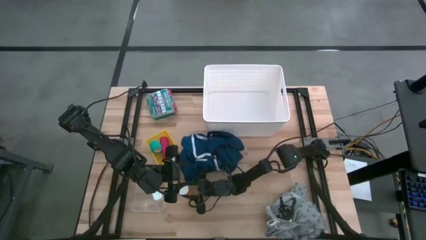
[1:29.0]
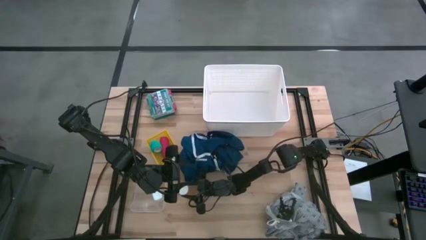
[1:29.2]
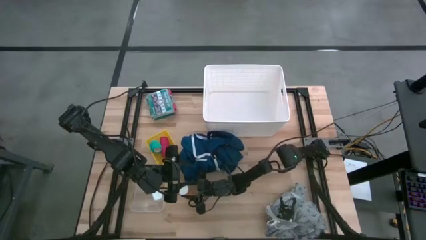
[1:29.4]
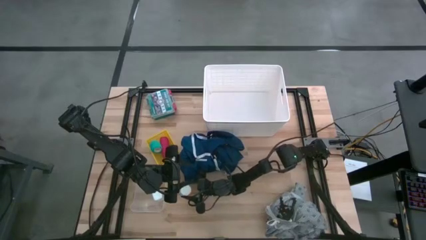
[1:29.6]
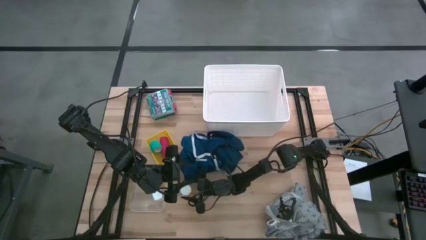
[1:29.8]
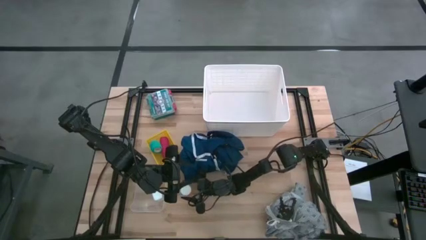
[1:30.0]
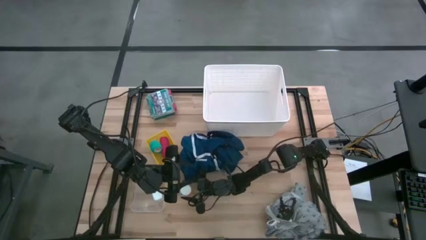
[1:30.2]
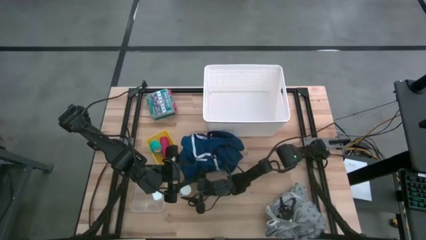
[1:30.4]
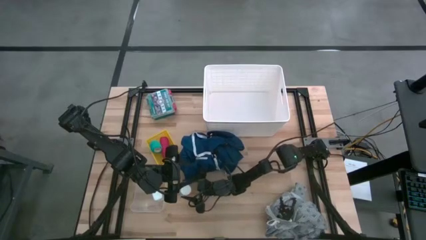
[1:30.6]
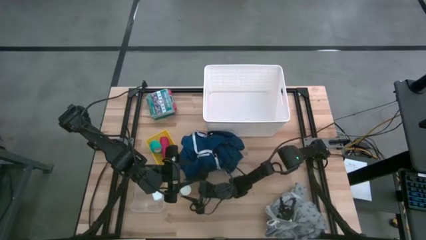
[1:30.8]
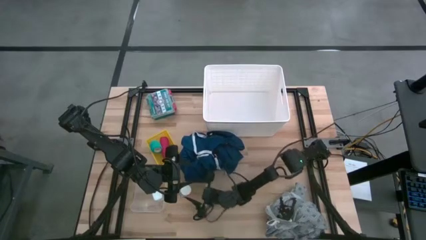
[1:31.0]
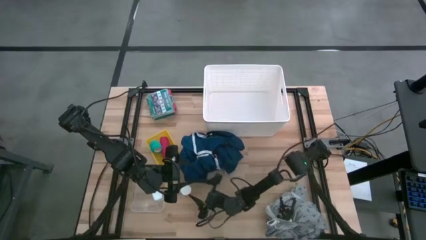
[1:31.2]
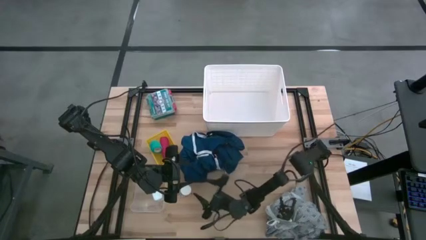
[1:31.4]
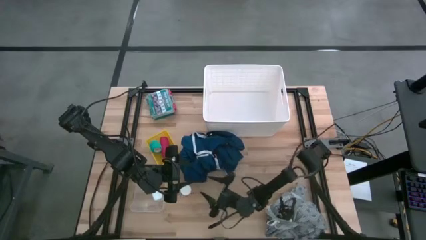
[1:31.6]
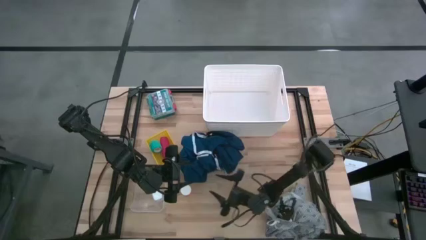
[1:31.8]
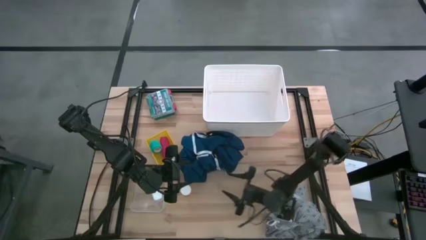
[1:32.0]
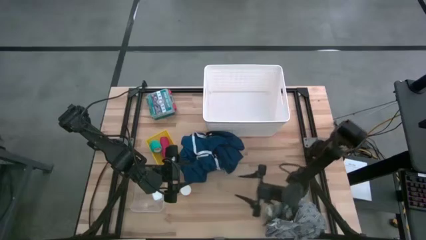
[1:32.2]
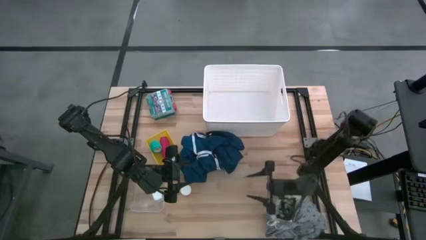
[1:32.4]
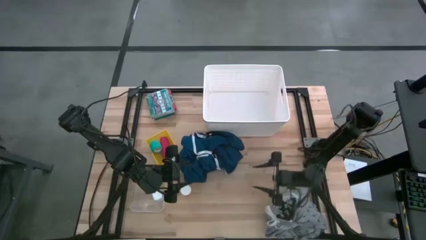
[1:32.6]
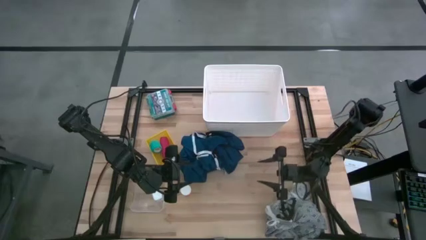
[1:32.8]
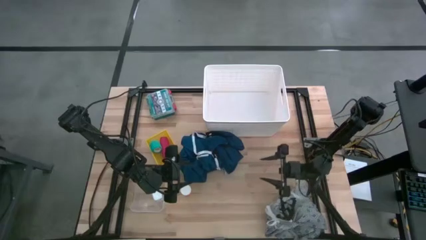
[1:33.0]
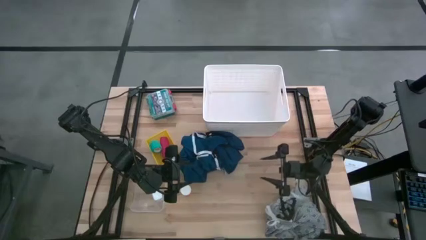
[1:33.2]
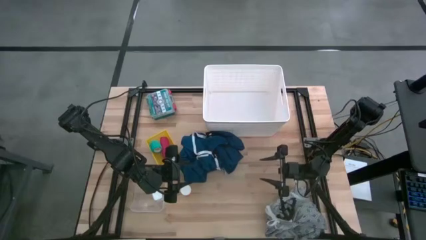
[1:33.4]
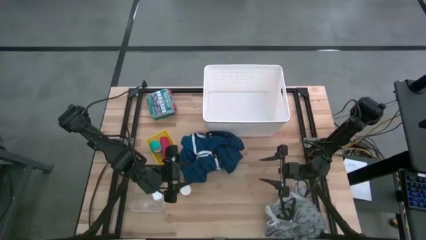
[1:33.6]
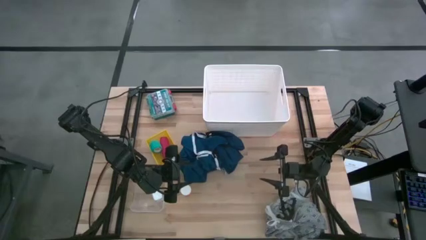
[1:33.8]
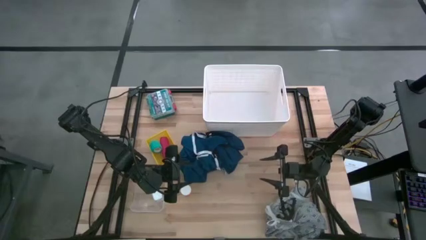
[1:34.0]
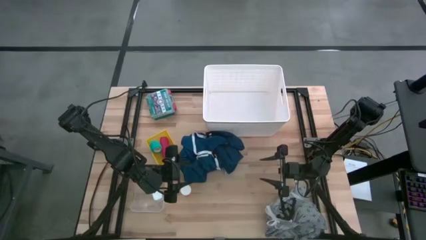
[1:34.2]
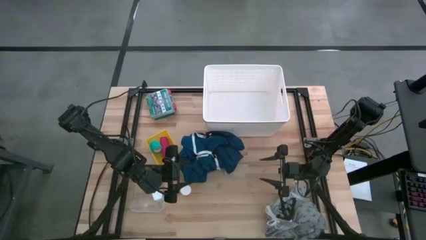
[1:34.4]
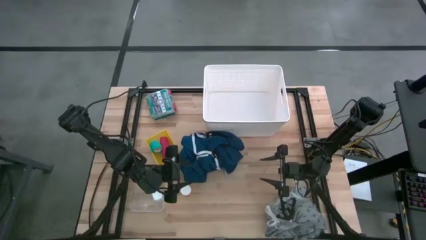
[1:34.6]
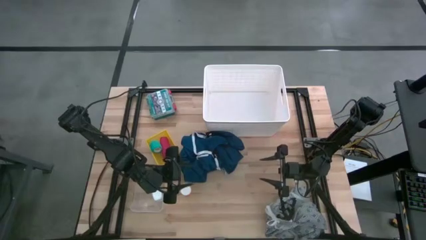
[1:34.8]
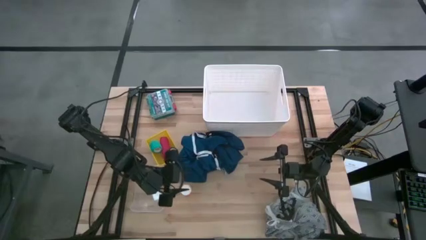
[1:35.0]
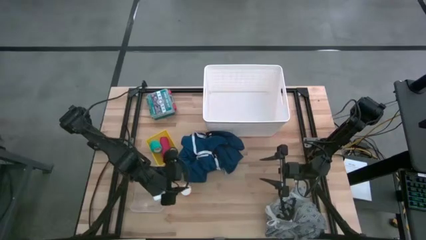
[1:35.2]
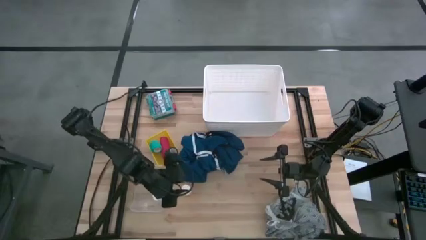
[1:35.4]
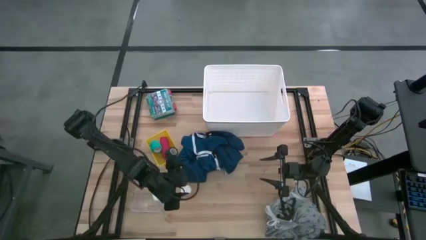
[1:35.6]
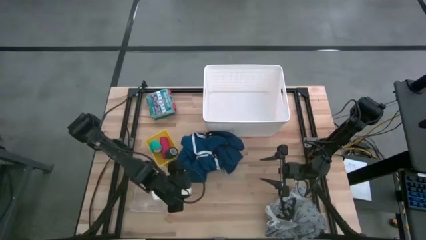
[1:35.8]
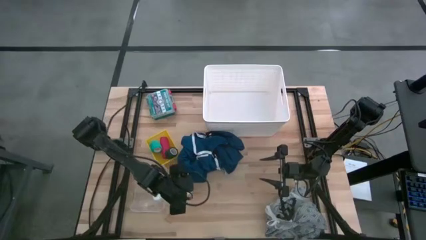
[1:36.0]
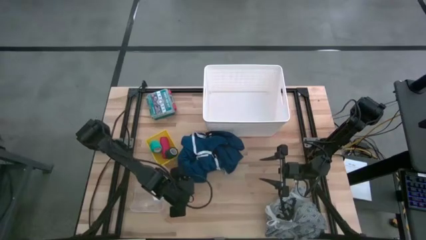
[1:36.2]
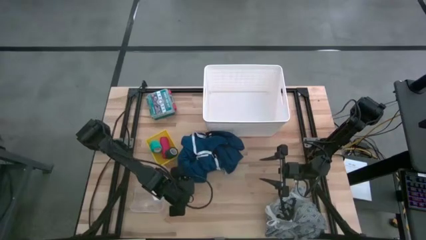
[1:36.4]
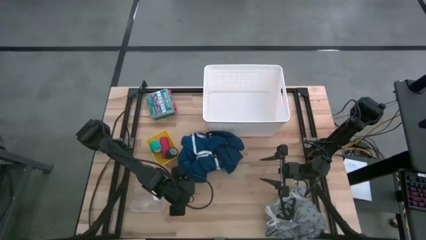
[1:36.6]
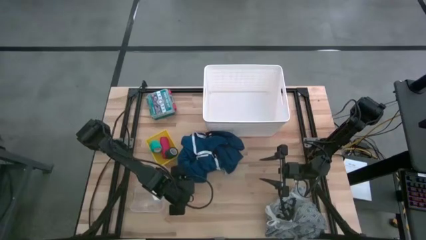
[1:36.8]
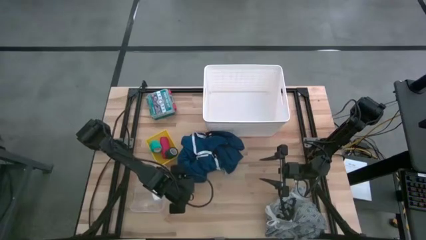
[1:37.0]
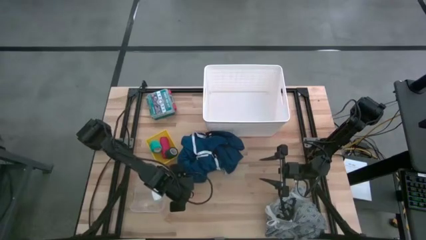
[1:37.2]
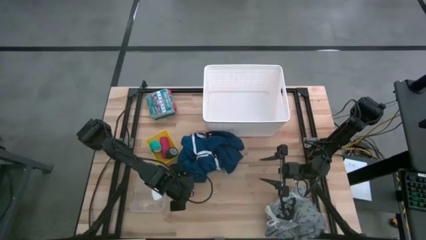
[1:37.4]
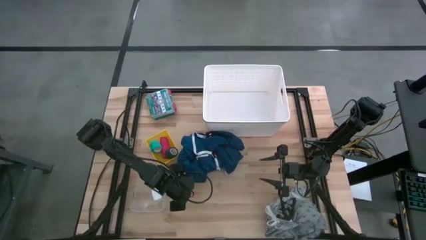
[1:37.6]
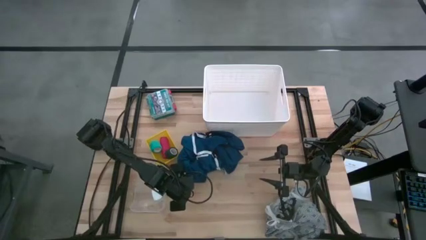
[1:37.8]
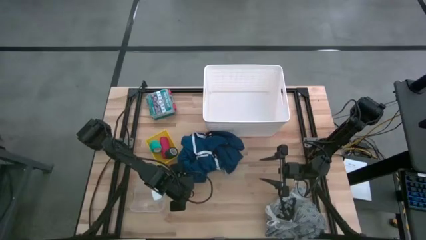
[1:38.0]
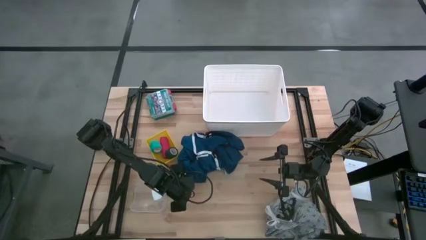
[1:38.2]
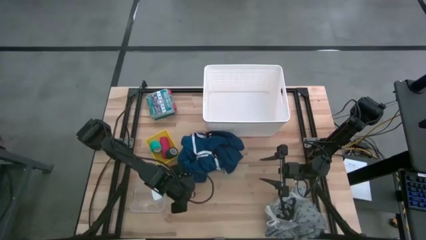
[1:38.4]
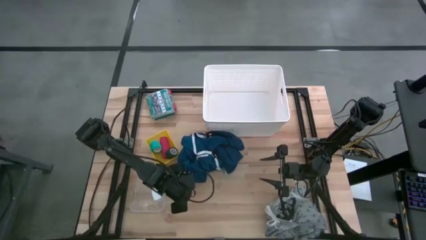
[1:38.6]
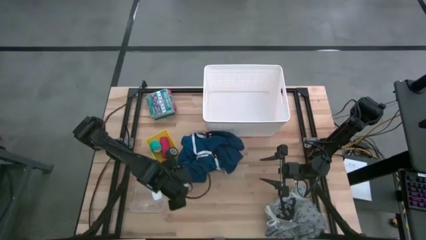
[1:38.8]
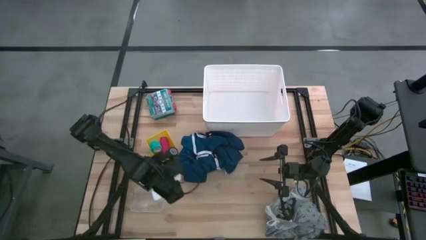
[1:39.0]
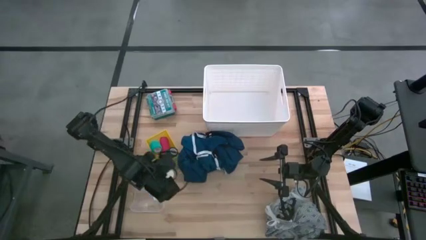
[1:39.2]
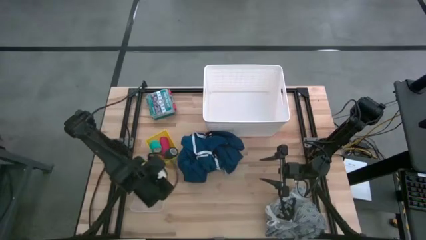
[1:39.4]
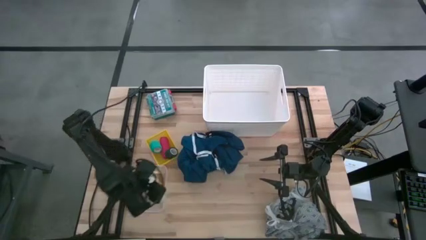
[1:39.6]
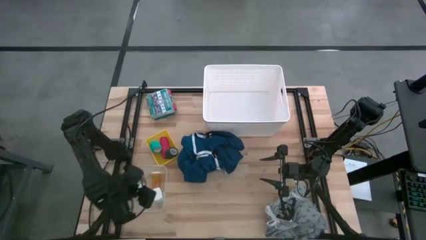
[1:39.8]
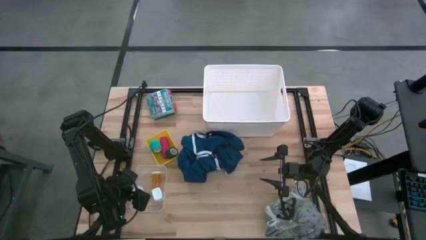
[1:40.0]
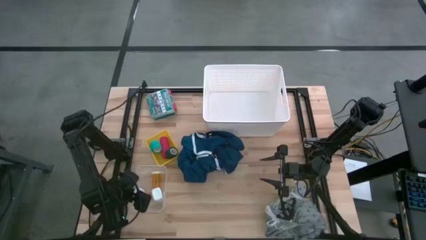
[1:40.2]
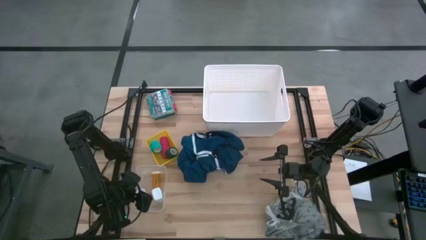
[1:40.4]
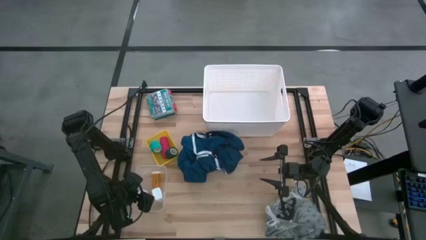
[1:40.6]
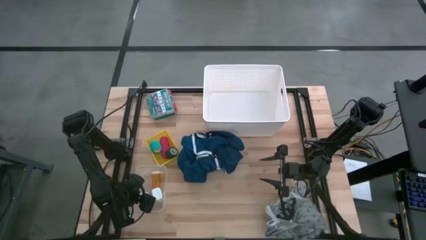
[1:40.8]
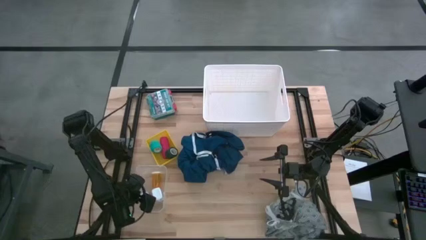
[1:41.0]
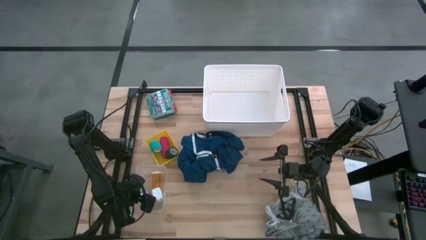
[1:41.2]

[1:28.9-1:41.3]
Task: Pick & place medical supplies in basket/bin
Put the orange pill bottle into the transparent bin
